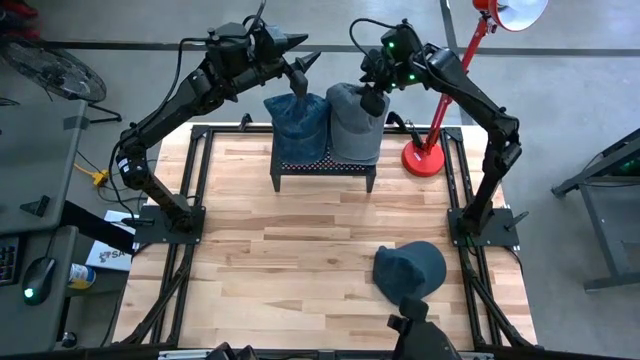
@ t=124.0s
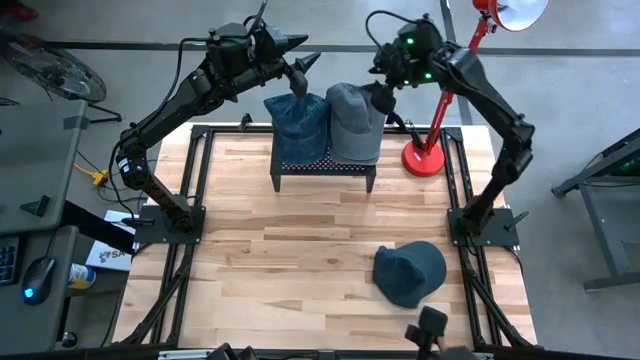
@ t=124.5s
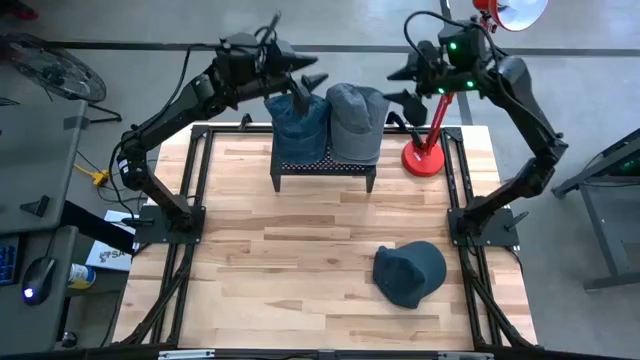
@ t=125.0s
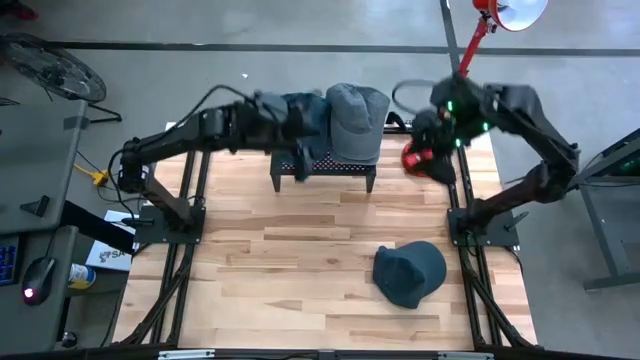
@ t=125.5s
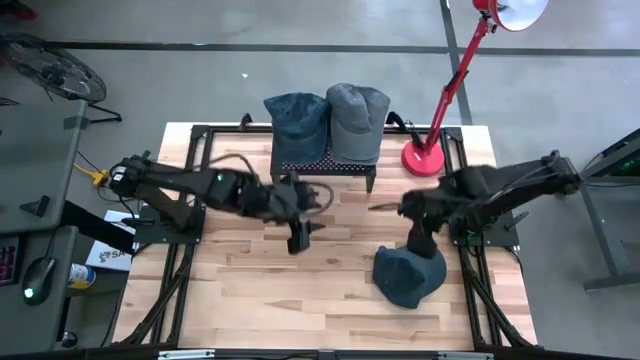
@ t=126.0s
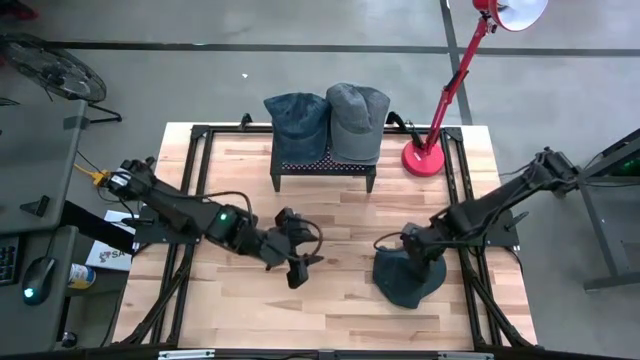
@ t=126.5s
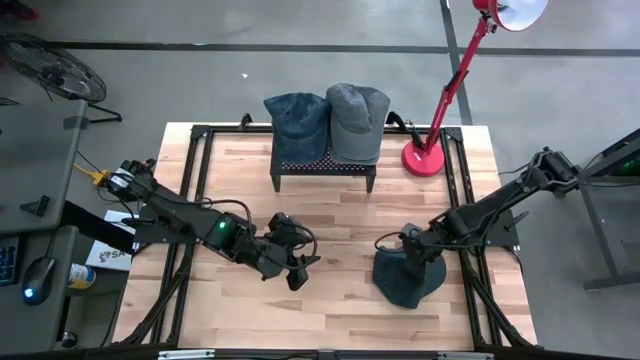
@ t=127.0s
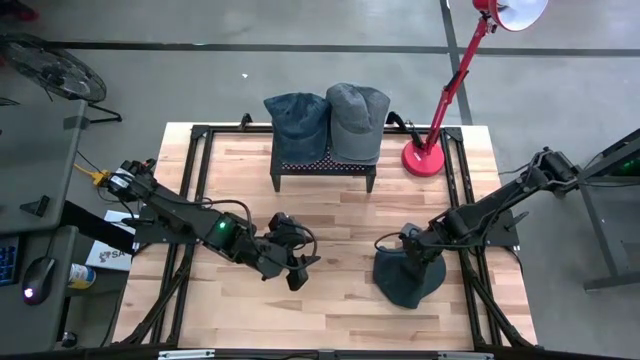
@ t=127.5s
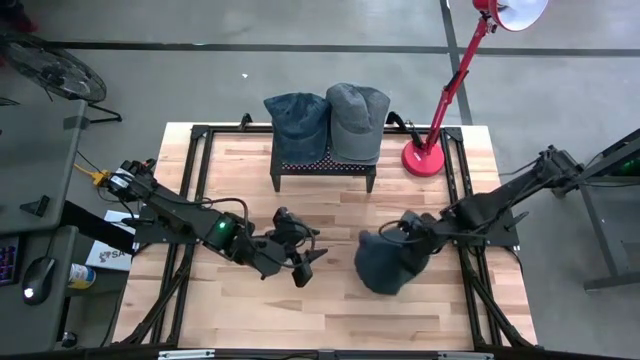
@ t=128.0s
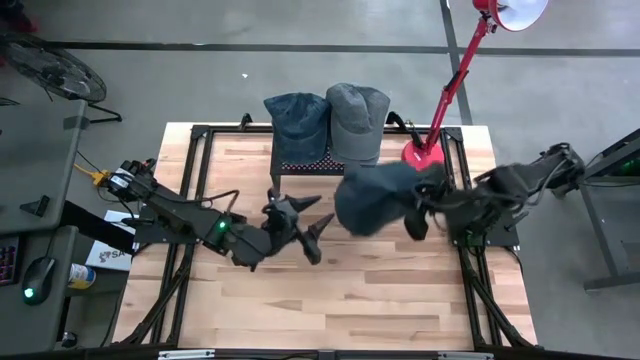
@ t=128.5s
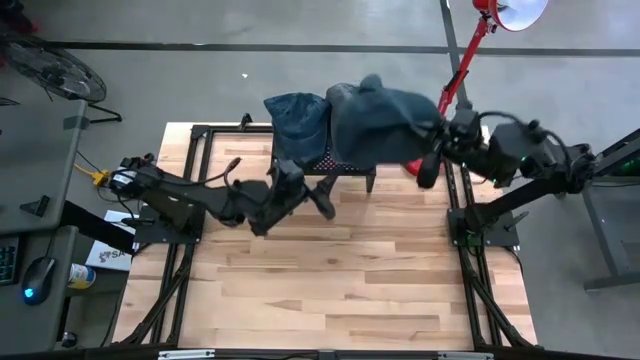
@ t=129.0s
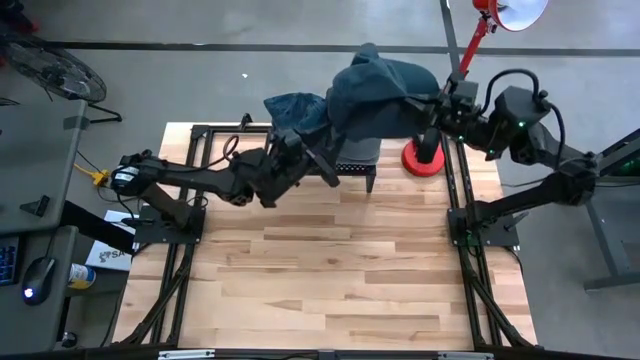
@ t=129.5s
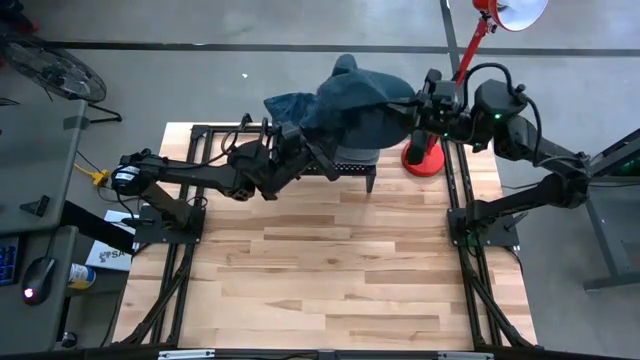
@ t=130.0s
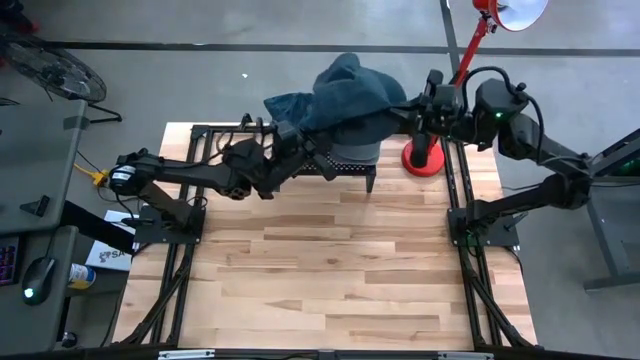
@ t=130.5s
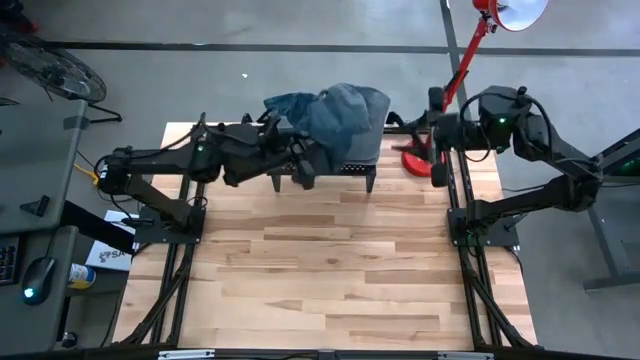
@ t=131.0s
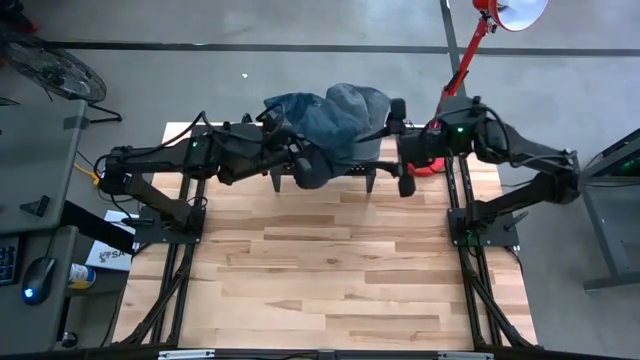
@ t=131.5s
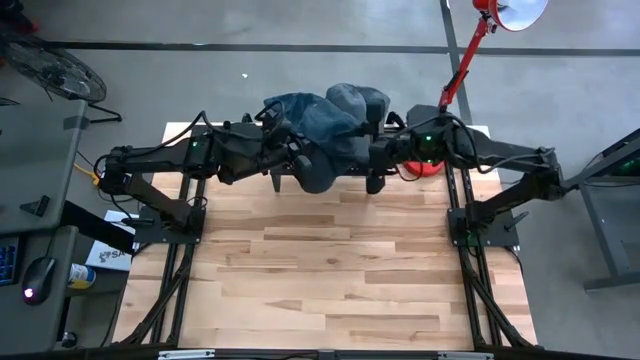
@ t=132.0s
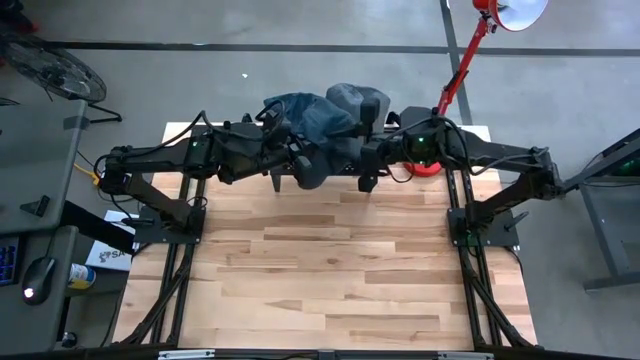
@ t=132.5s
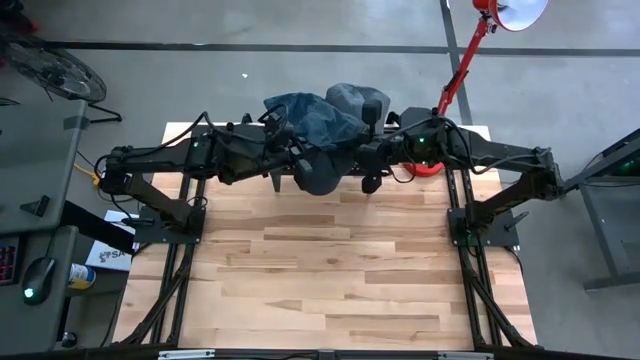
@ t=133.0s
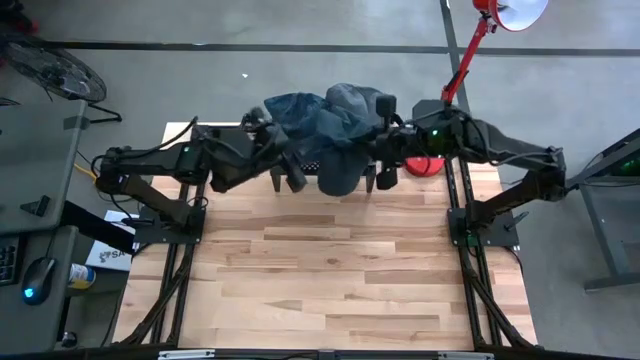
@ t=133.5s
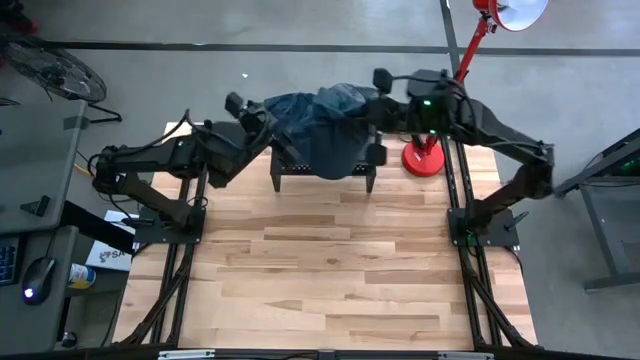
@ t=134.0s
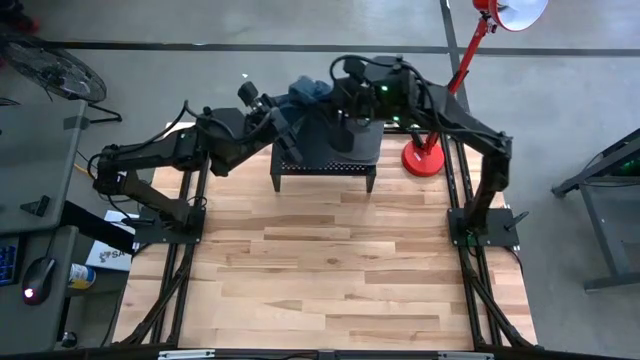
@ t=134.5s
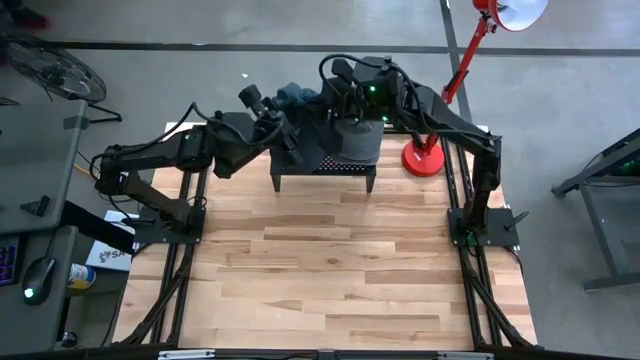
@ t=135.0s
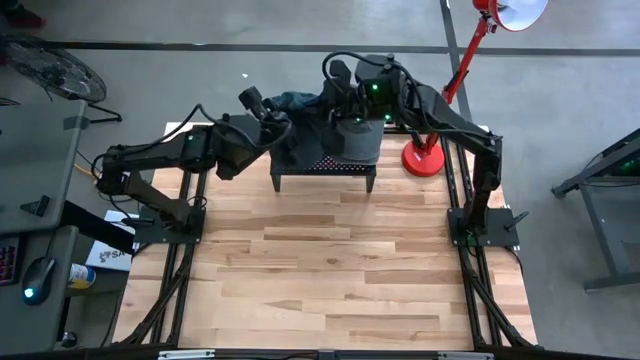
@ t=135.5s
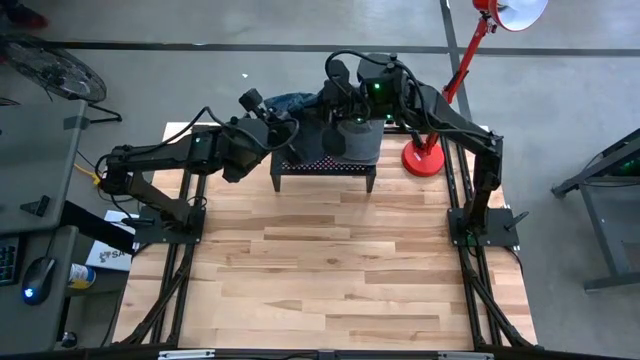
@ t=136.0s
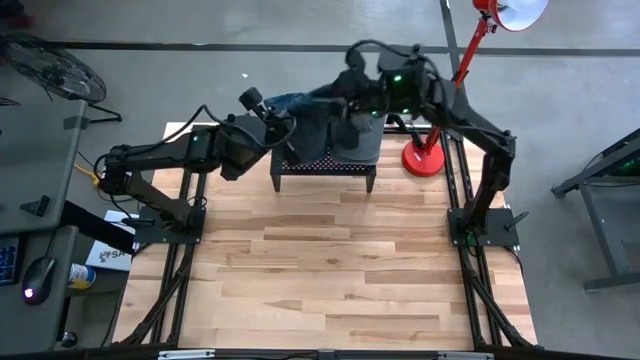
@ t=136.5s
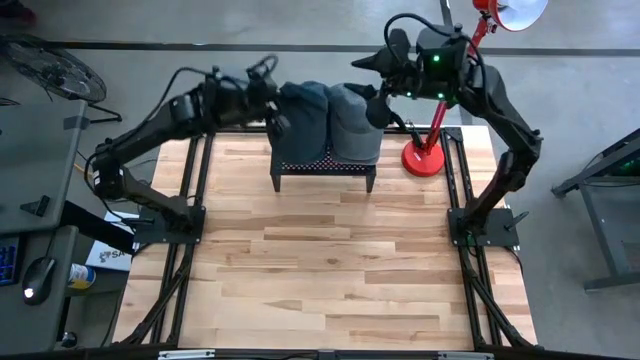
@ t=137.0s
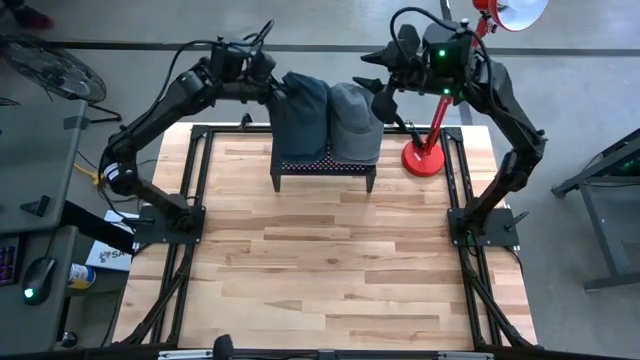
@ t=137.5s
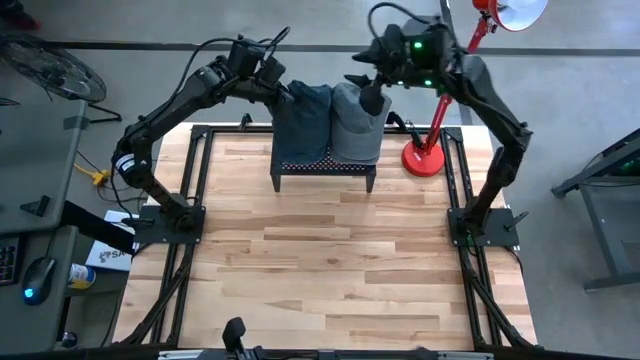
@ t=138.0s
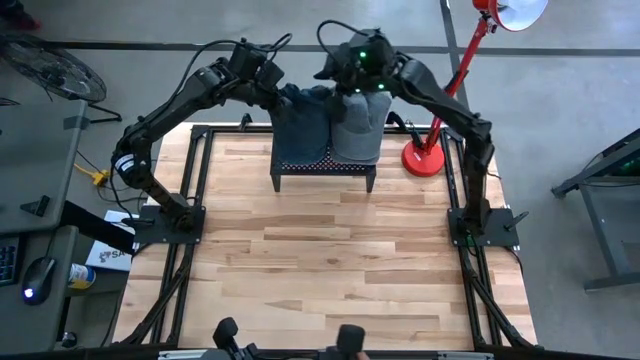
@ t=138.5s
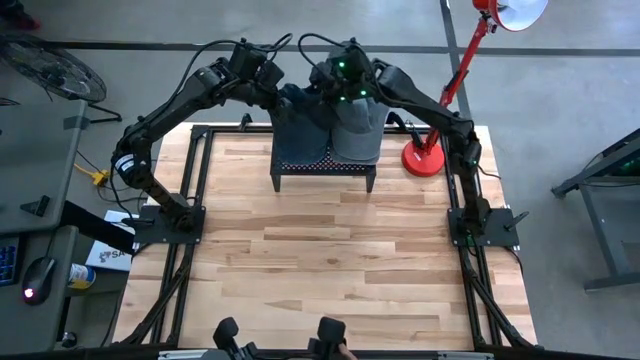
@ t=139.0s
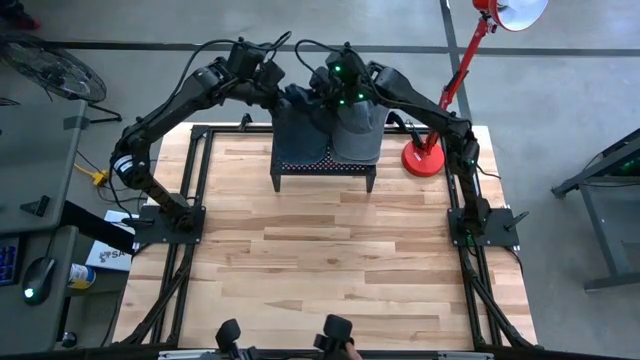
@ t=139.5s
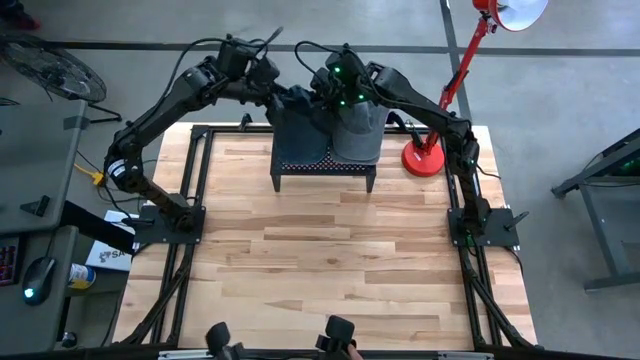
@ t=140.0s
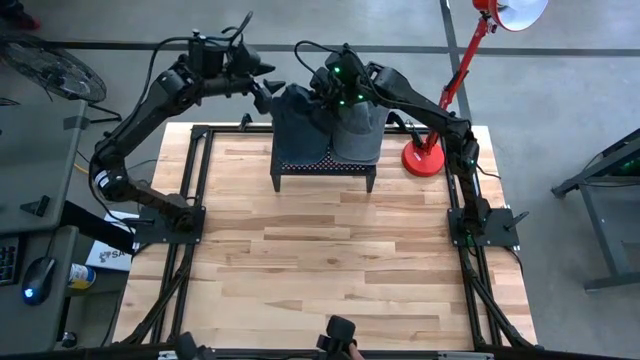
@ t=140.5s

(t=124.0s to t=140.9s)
Task: Pick & Place hat
Stack the blue cap on the blue cap on the shelf

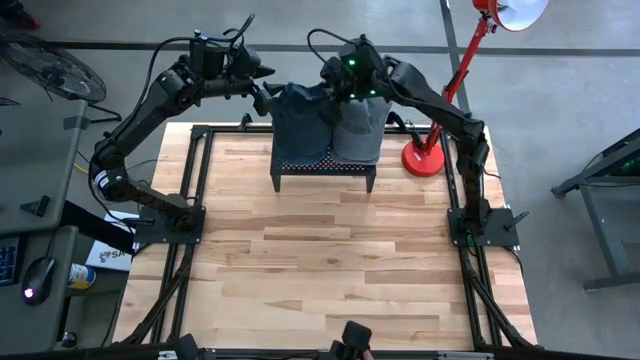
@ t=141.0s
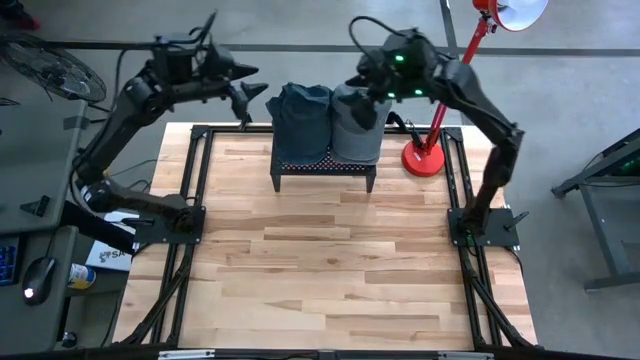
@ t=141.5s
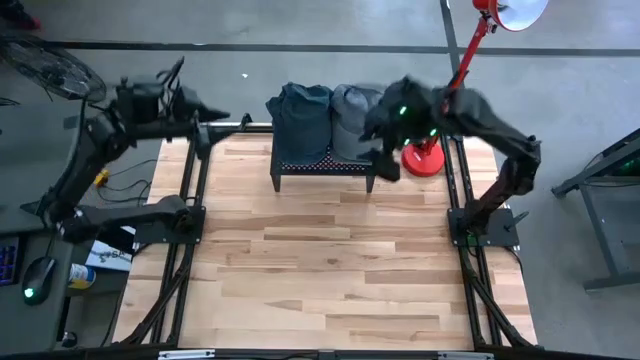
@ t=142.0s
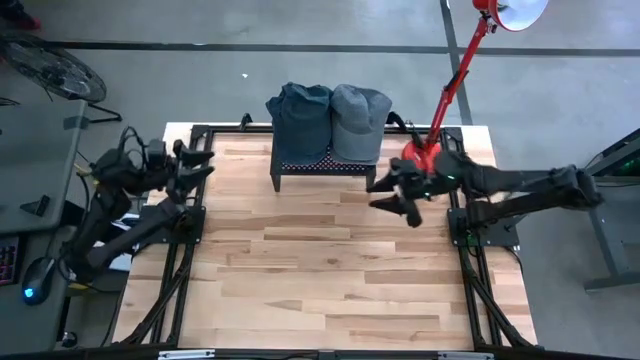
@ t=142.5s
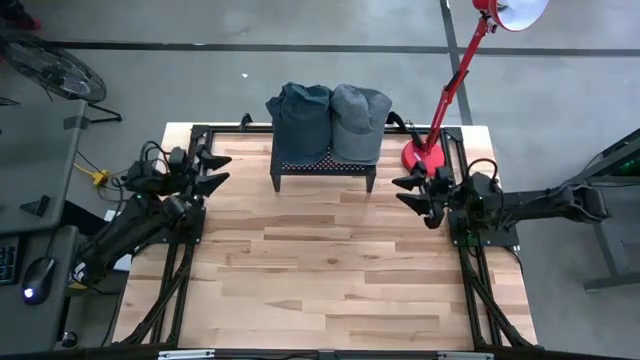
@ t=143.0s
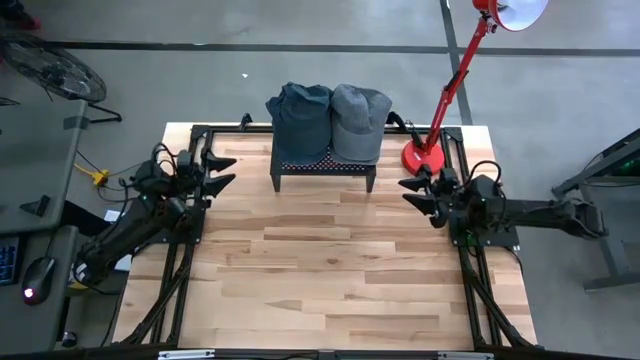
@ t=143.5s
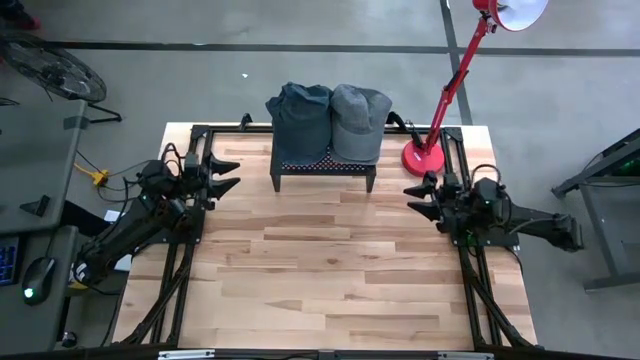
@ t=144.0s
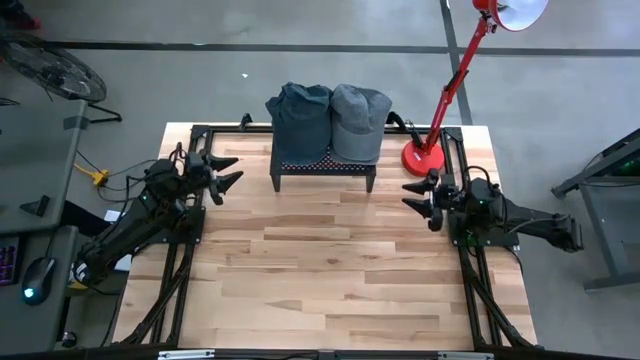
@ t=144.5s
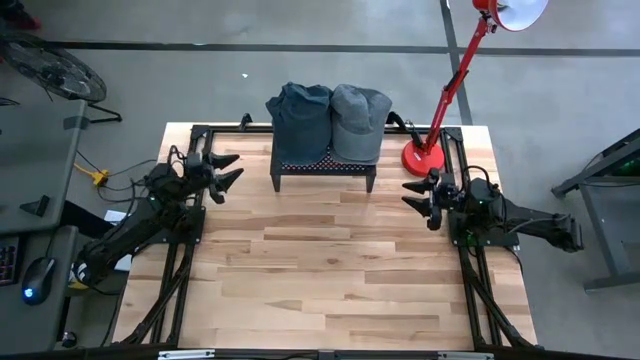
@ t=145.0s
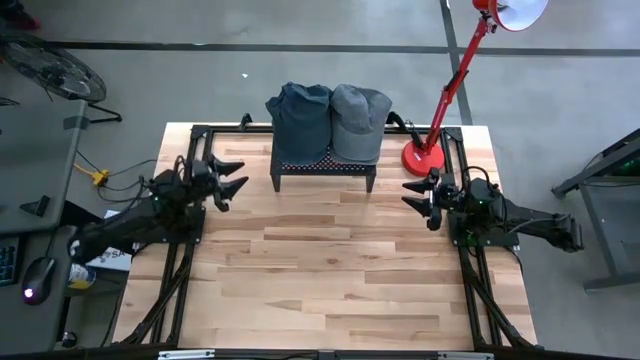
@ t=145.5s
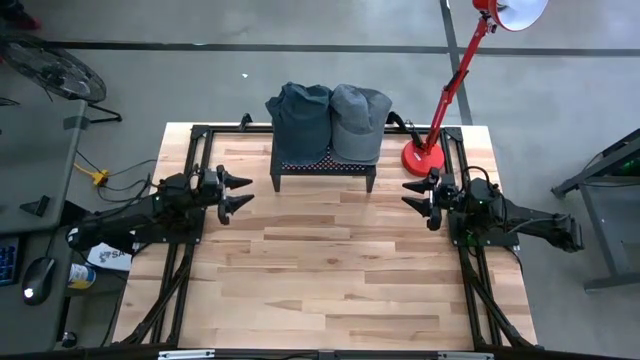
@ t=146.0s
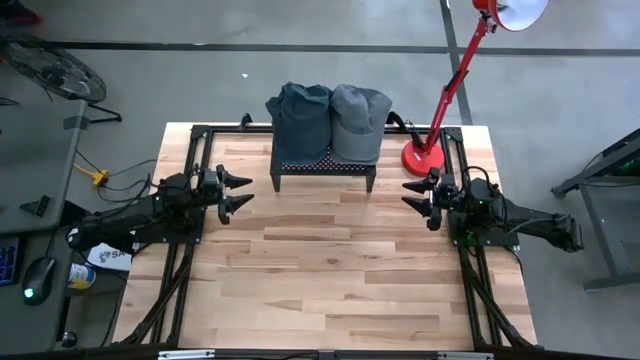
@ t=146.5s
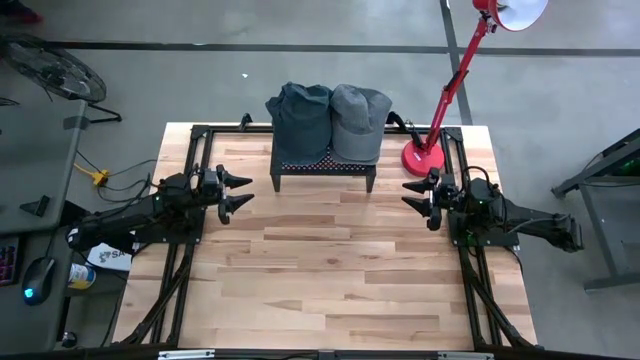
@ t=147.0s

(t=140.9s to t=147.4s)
Return to Home Position
